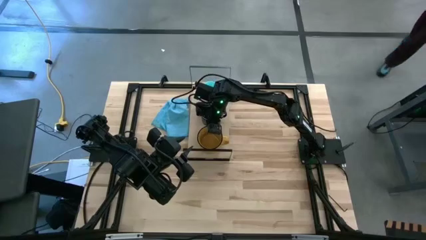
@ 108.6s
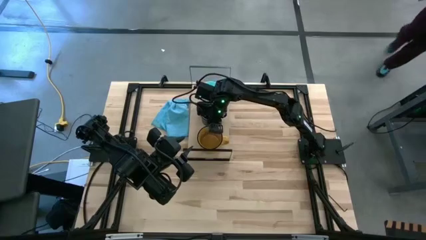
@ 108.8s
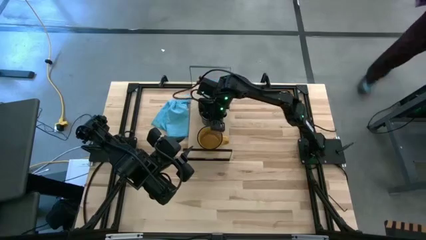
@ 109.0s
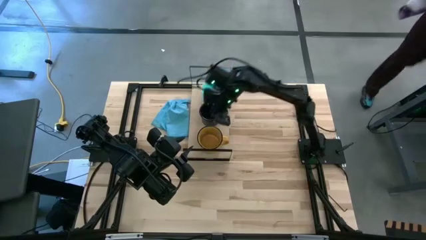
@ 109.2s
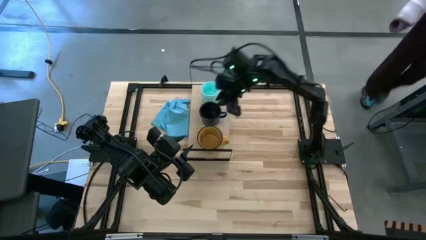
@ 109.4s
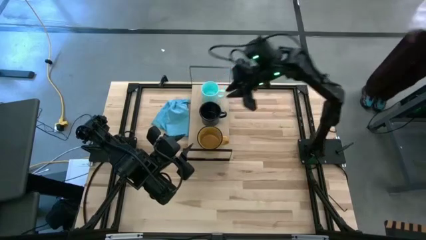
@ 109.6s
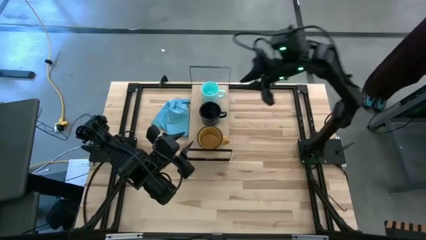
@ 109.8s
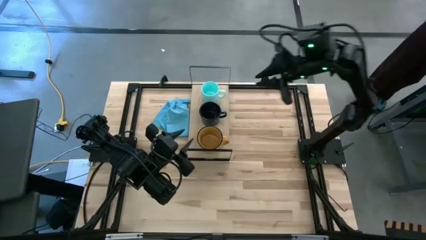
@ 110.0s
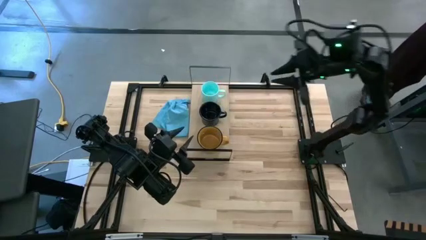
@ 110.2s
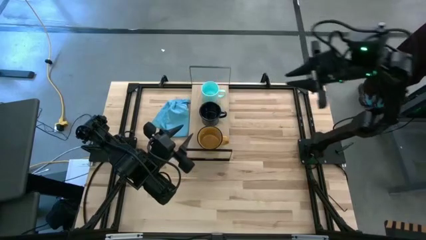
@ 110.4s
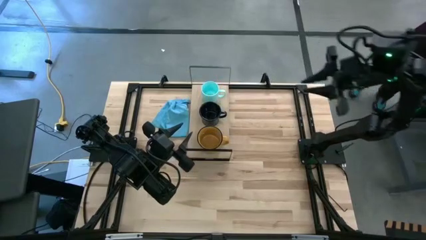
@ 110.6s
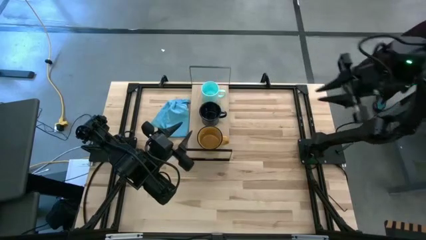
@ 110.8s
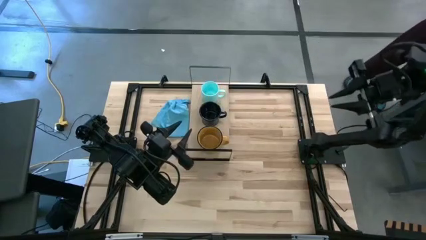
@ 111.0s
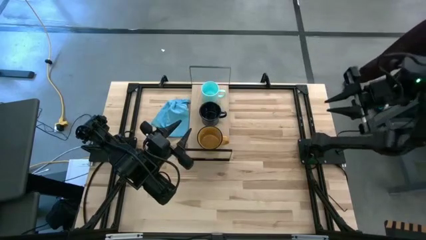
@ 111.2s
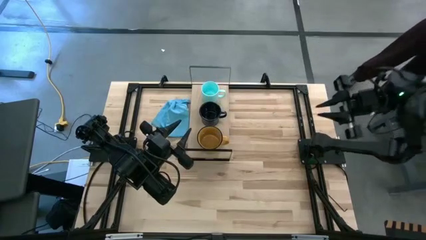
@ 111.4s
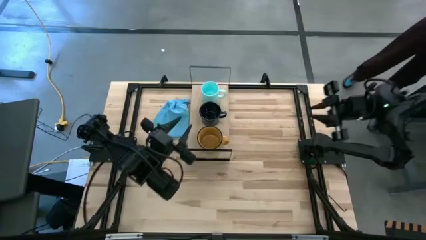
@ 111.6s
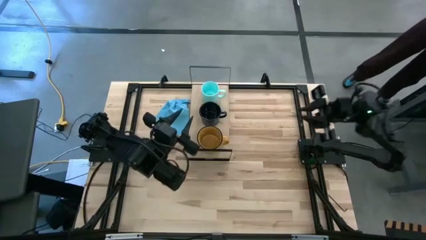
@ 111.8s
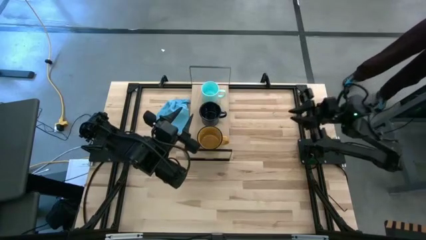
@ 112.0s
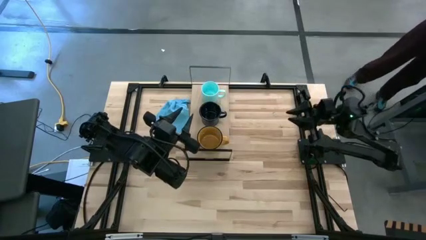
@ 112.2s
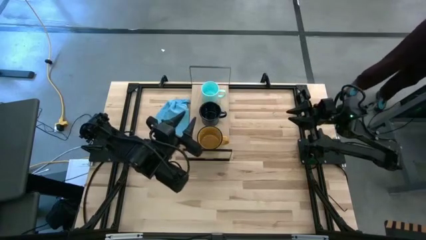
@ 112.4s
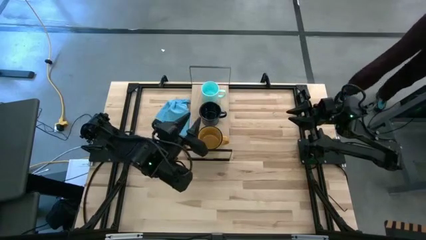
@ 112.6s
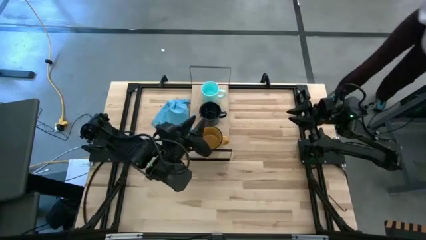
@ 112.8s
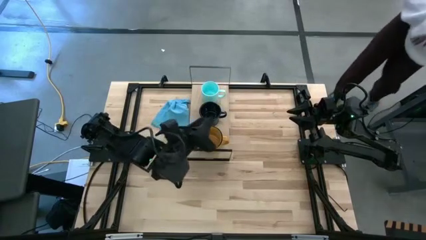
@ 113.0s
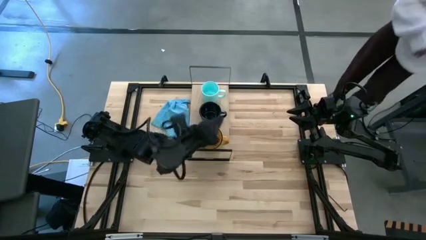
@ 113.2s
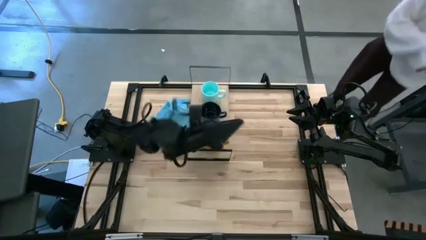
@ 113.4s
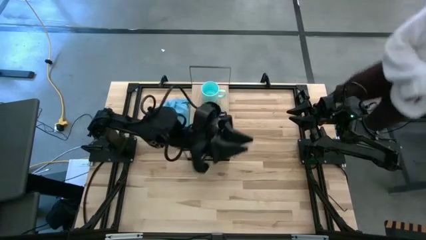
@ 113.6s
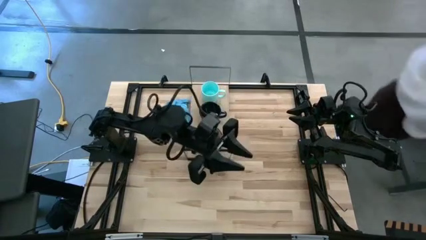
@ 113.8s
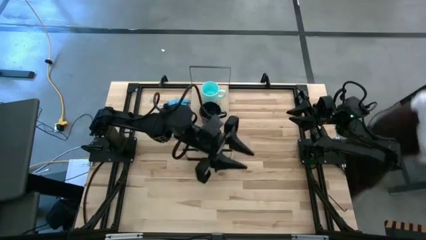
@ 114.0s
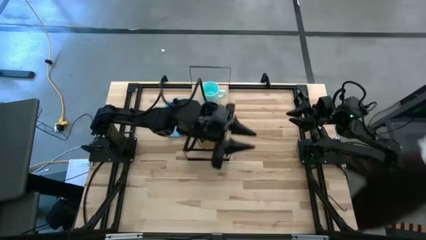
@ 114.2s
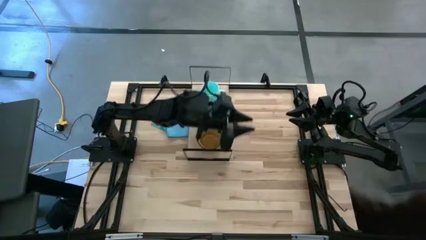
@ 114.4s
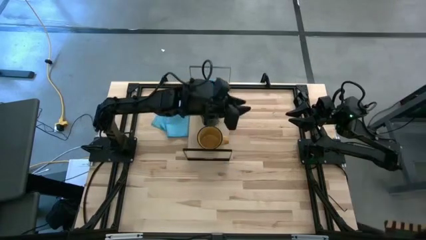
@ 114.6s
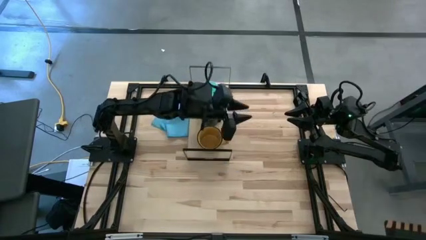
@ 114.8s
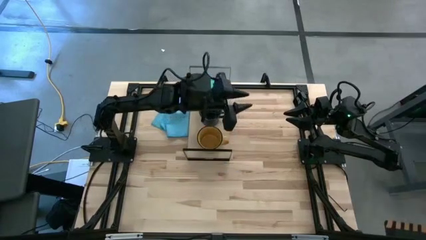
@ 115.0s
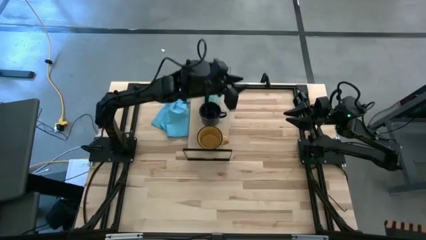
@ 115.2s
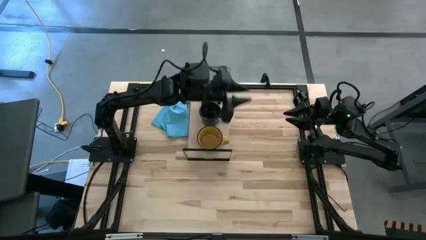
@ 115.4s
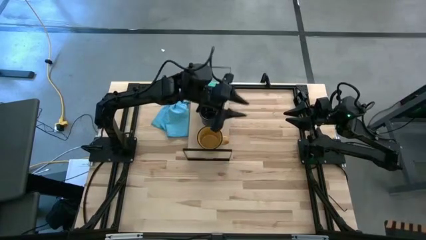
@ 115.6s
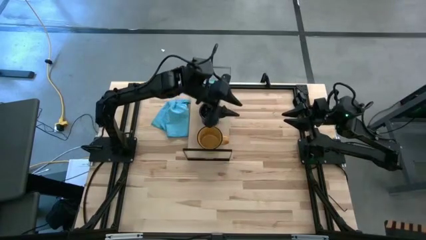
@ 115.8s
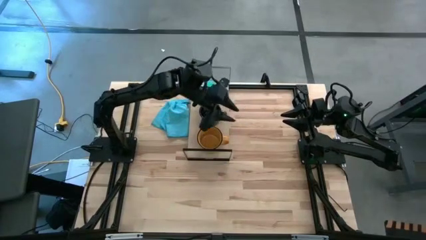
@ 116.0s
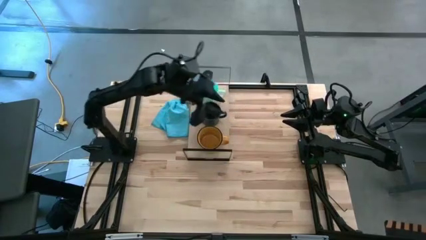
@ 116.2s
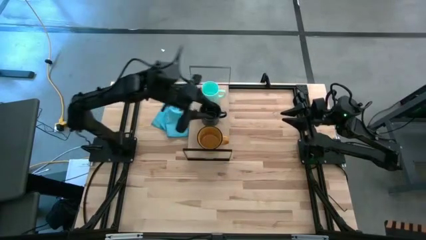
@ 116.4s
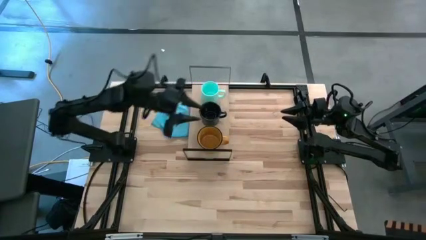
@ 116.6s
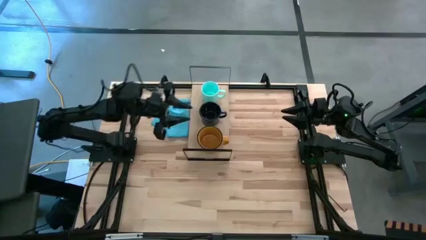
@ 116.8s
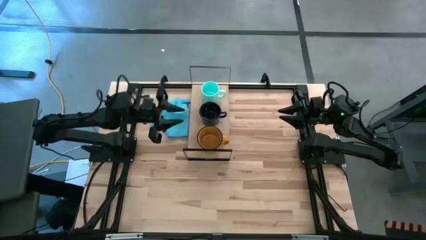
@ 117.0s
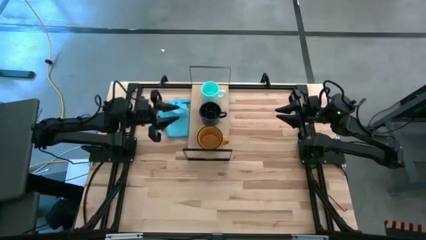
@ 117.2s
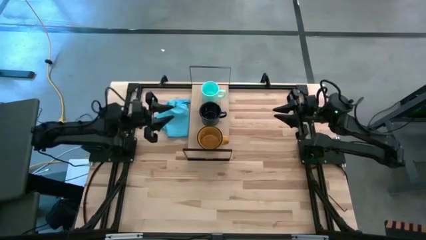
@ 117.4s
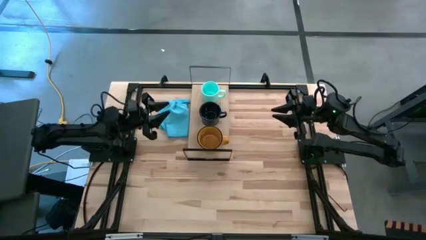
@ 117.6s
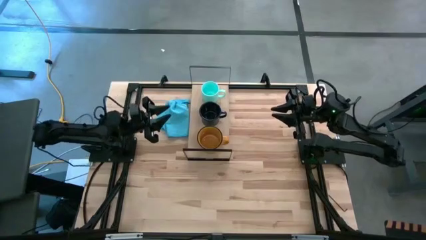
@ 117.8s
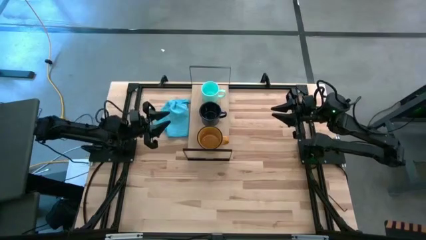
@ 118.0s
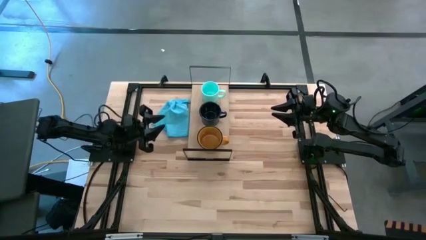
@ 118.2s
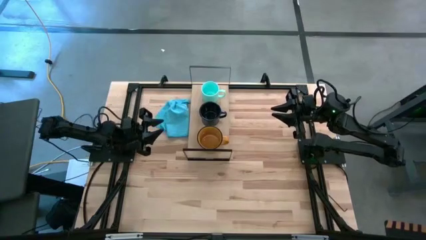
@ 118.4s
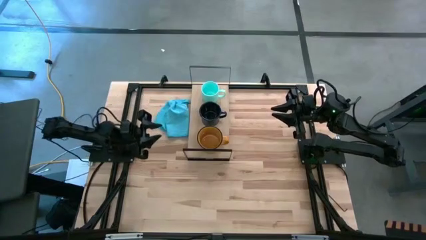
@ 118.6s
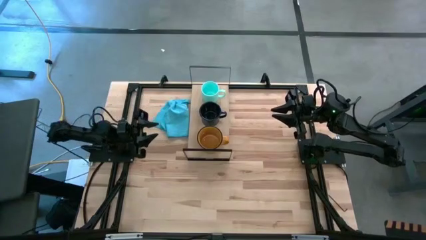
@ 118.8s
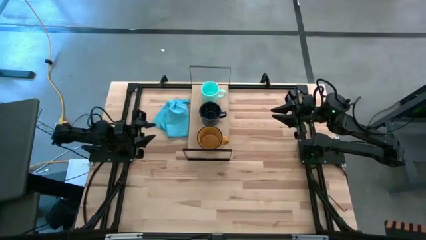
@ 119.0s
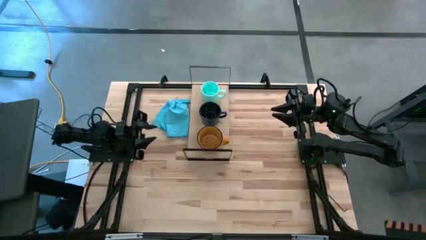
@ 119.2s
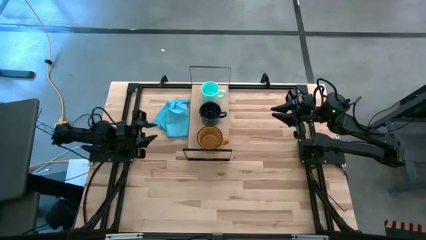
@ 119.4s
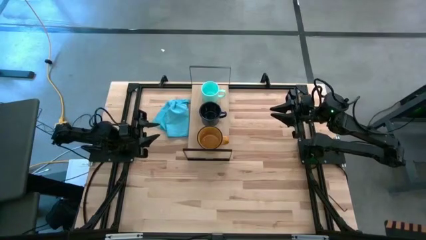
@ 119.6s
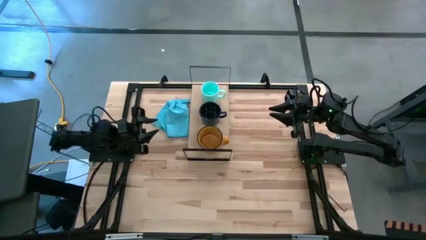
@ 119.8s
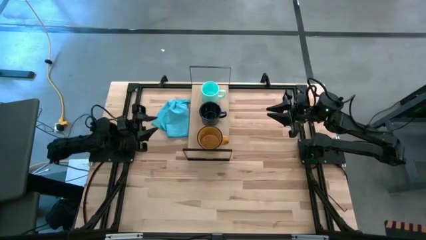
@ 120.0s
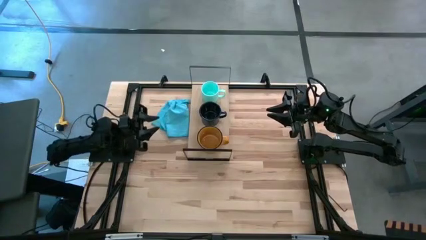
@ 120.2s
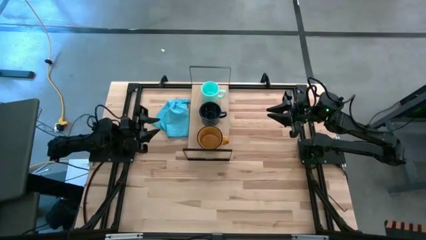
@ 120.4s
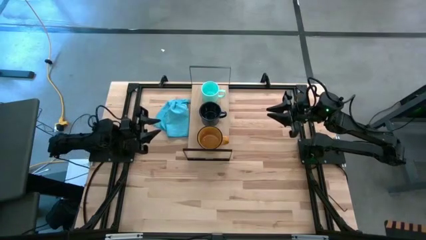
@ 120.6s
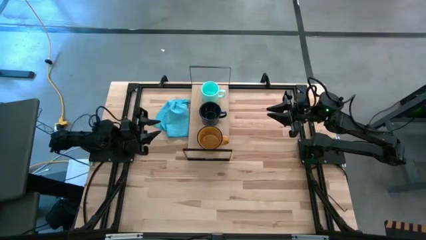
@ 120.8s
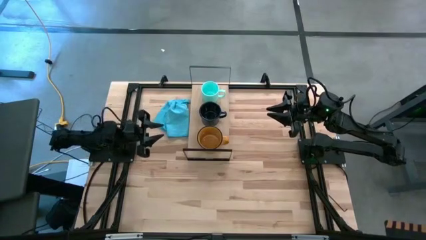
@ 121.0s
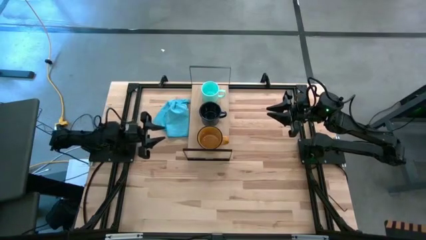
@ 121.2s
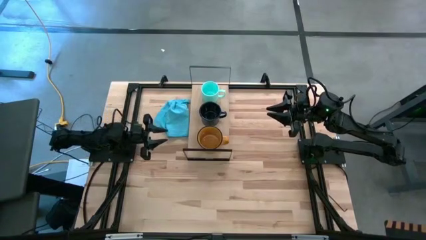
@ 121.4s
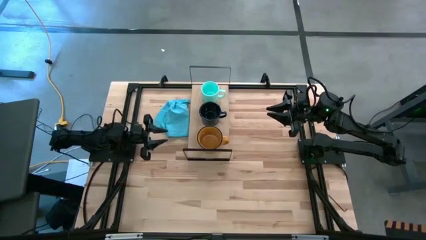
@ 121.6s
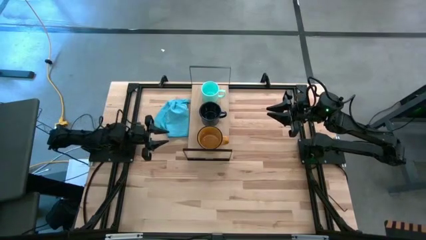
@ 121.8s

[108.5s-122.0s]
Task: Stack small to large cups/mugs on shelf
Return to Home Position

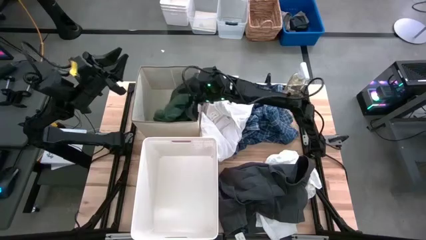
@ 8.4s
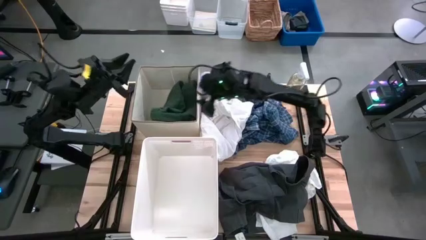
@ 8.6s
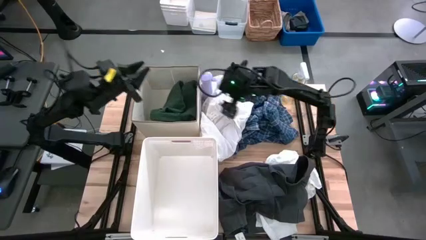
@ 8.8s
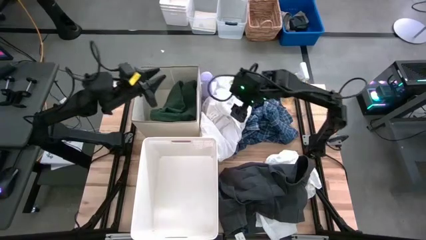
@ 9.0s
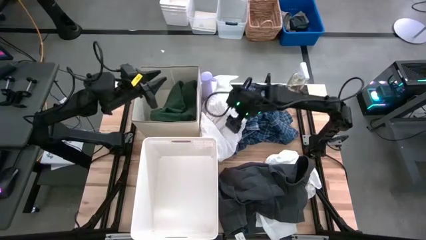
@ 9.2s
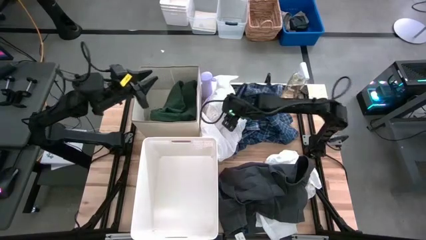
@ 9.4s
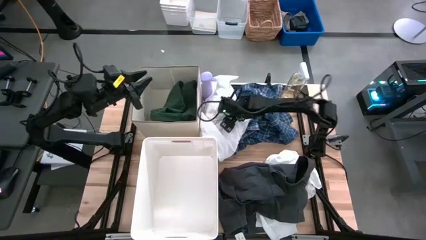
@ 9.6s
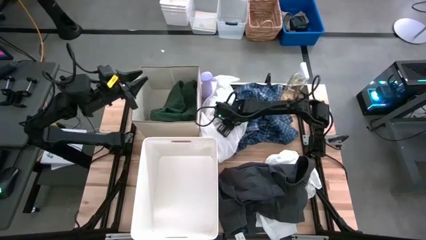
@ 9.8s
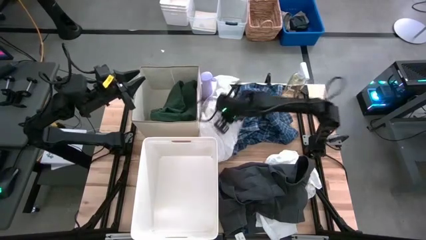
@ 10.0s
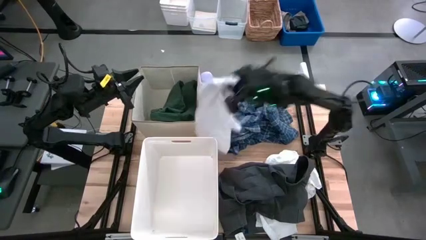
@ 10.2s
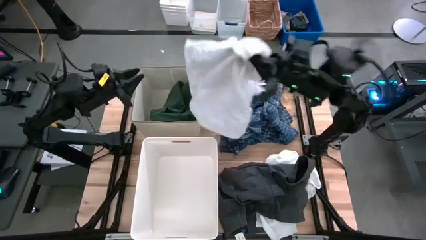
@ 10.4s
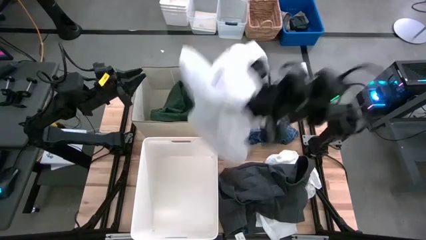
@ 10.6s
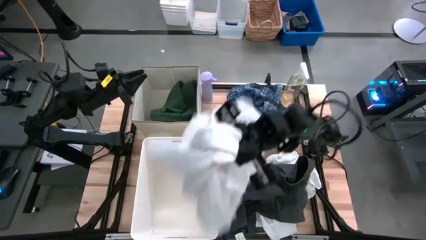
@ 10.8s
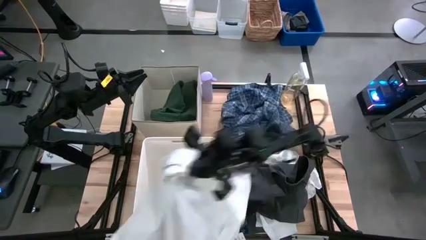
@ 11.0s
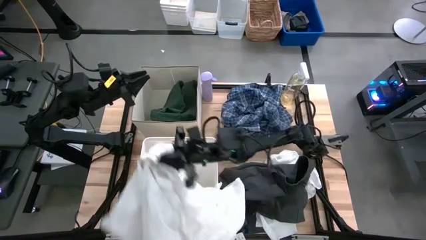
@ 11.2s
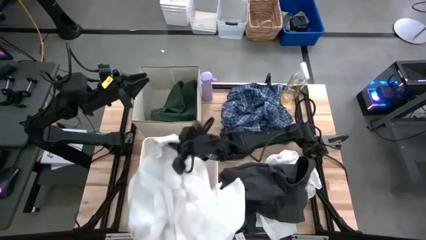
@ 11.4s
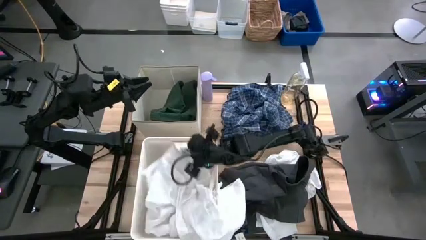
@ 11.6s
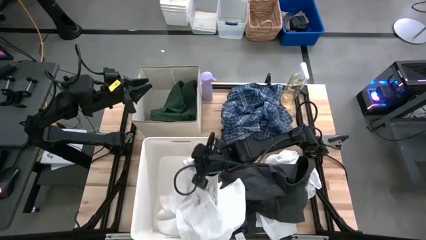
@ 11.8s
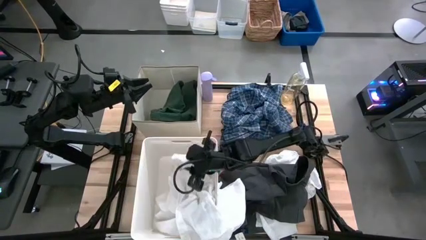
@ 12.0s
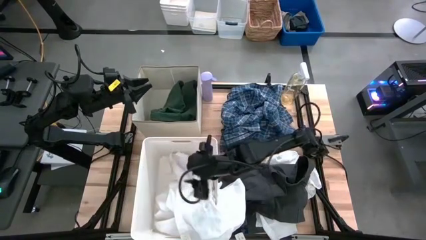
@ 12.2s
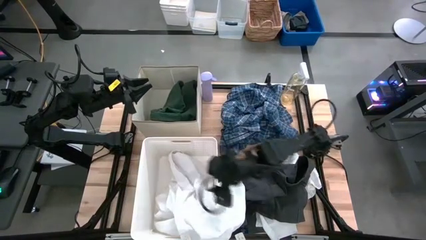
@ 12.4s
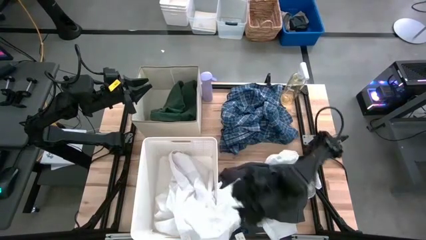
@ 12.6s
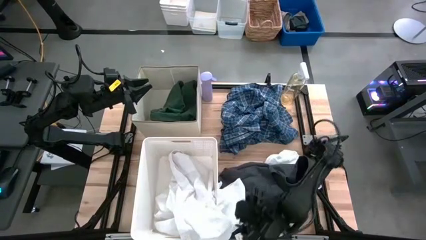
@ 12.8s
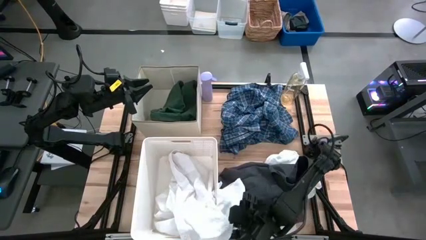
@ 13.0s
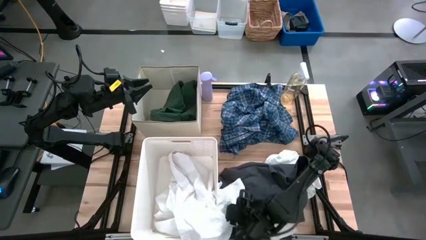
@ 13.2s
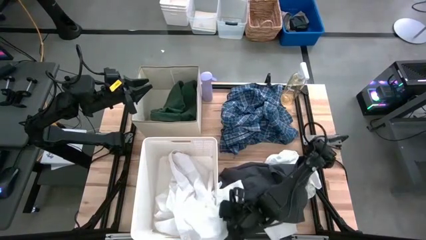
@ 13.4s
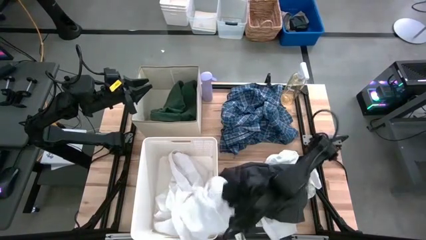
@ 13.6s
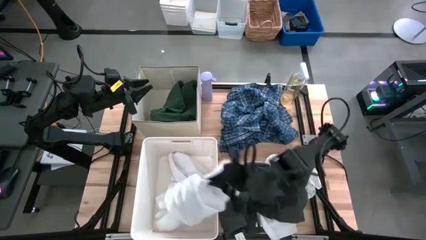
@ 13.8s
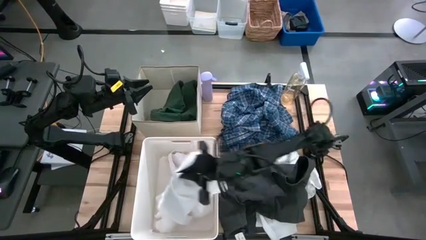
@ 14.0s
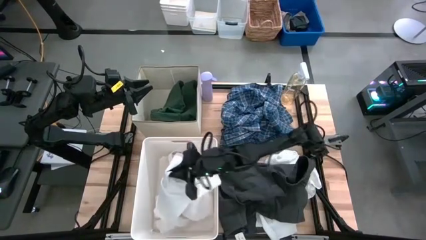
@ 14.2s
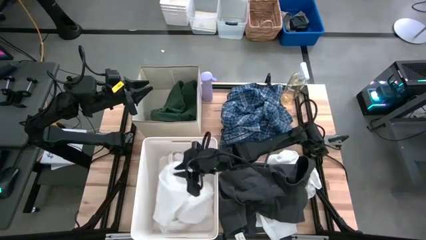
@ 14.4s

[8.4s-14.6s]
Task: Sort clothes
Put the white polo shirt into the bottom white laundry organizer
